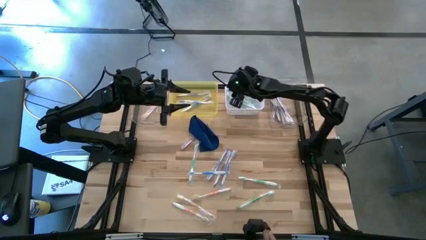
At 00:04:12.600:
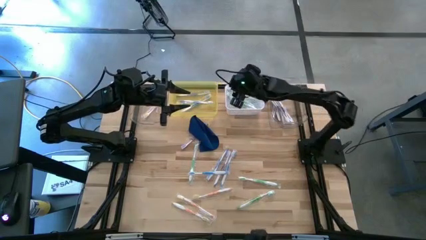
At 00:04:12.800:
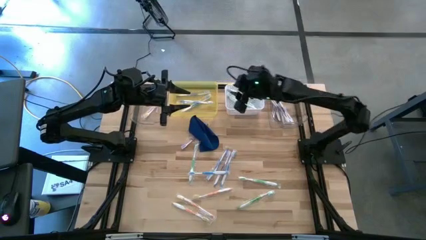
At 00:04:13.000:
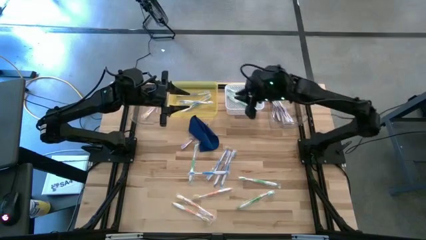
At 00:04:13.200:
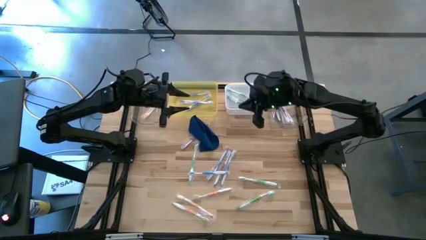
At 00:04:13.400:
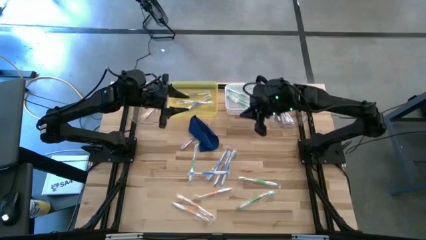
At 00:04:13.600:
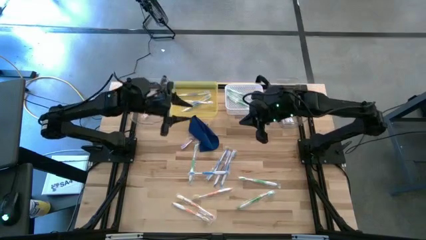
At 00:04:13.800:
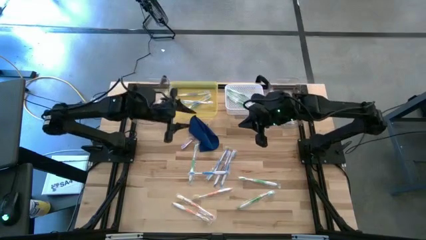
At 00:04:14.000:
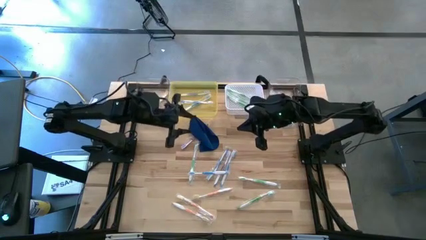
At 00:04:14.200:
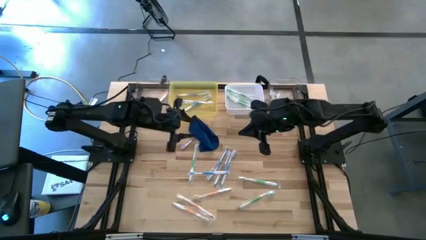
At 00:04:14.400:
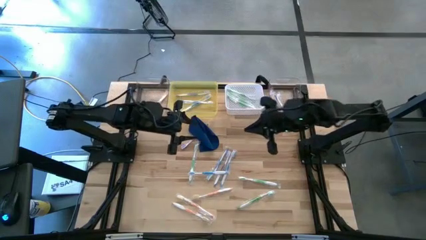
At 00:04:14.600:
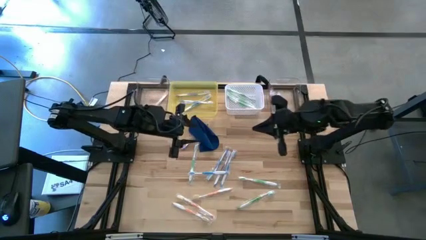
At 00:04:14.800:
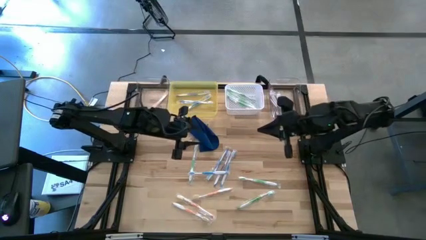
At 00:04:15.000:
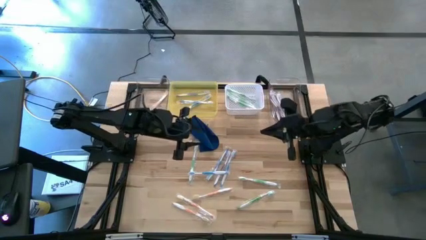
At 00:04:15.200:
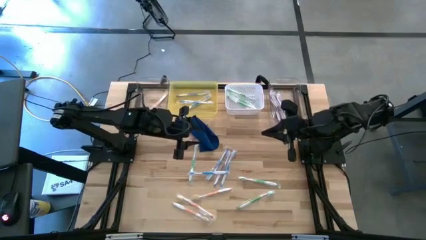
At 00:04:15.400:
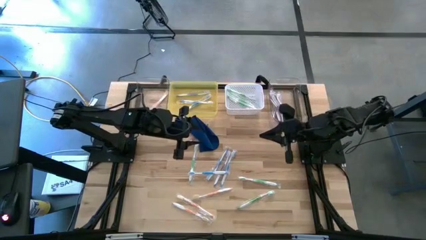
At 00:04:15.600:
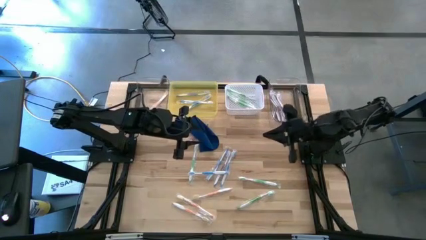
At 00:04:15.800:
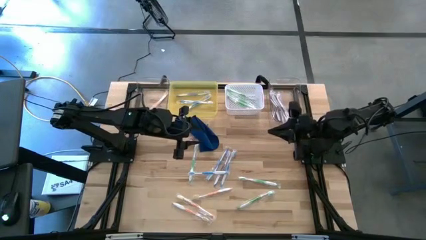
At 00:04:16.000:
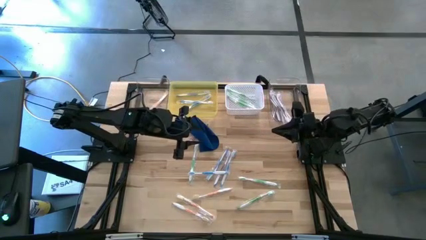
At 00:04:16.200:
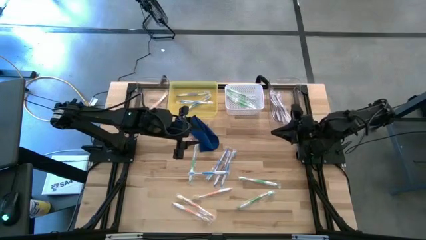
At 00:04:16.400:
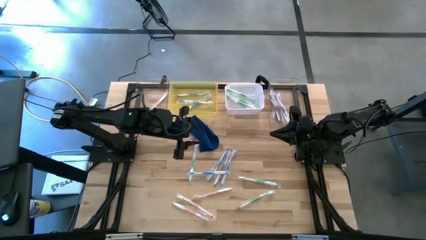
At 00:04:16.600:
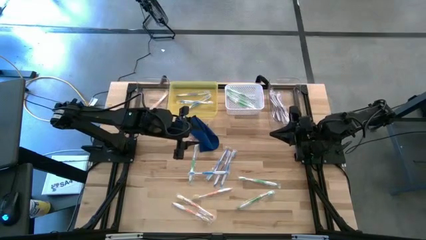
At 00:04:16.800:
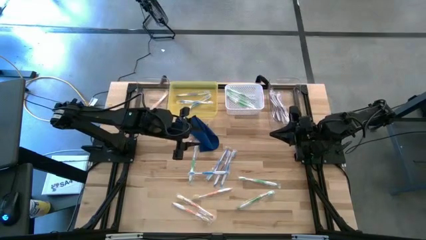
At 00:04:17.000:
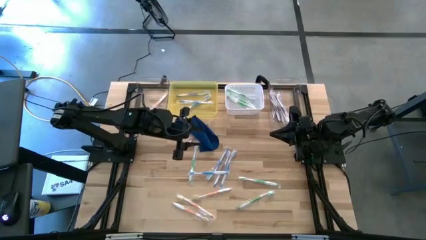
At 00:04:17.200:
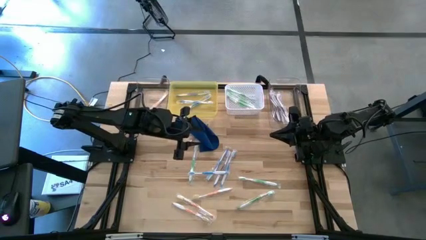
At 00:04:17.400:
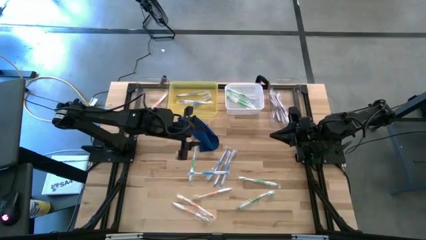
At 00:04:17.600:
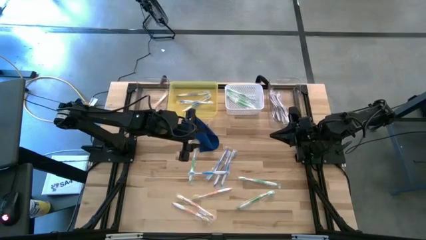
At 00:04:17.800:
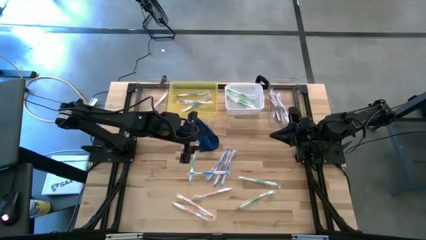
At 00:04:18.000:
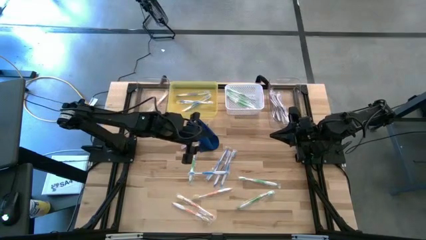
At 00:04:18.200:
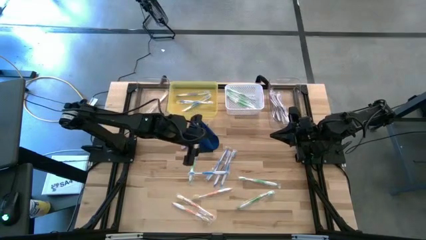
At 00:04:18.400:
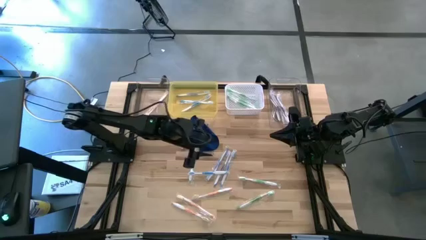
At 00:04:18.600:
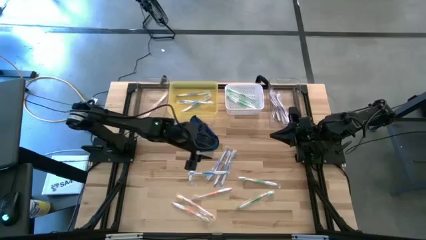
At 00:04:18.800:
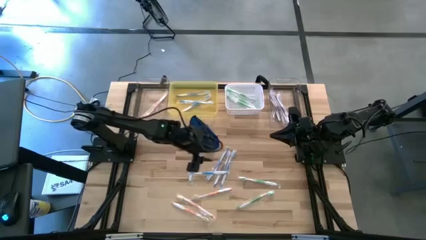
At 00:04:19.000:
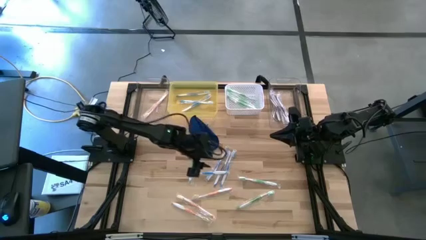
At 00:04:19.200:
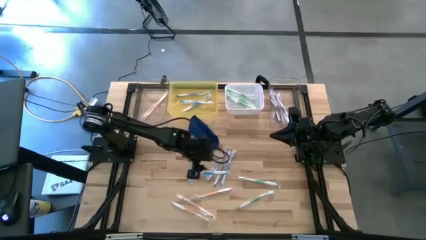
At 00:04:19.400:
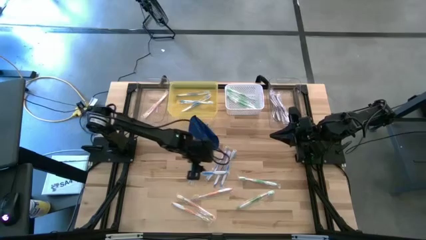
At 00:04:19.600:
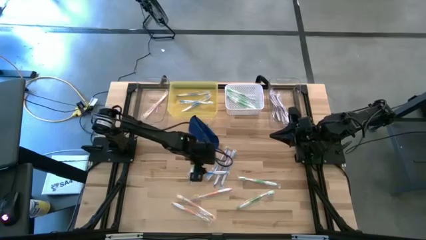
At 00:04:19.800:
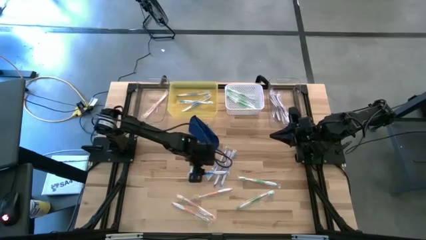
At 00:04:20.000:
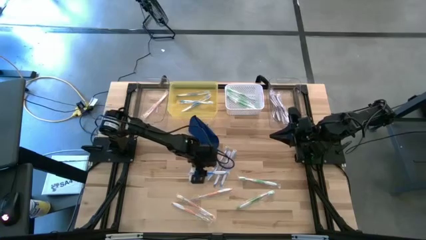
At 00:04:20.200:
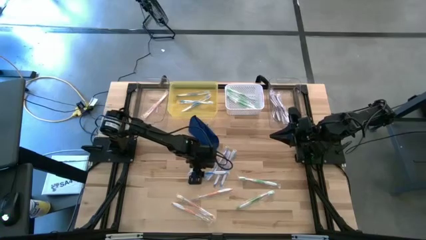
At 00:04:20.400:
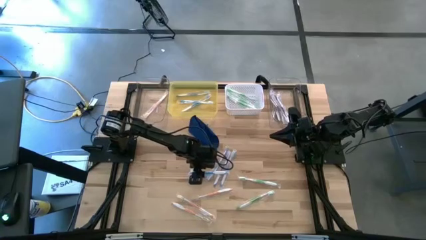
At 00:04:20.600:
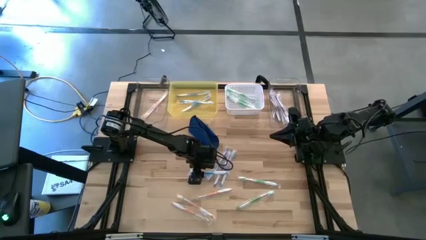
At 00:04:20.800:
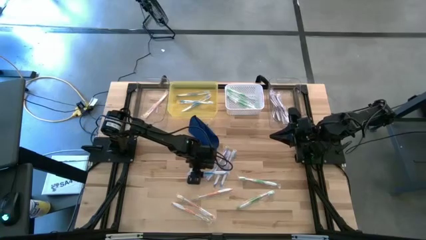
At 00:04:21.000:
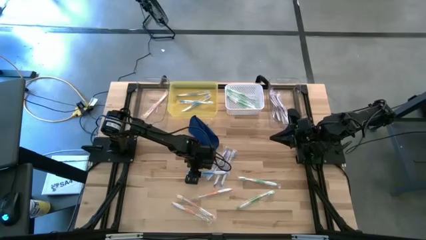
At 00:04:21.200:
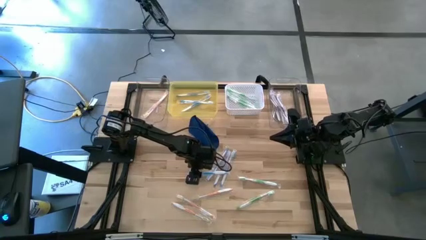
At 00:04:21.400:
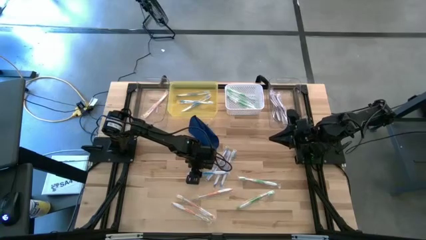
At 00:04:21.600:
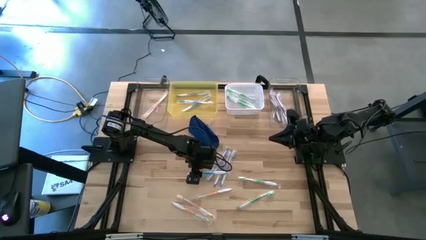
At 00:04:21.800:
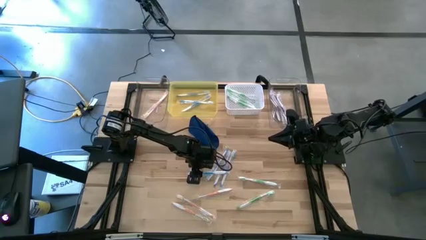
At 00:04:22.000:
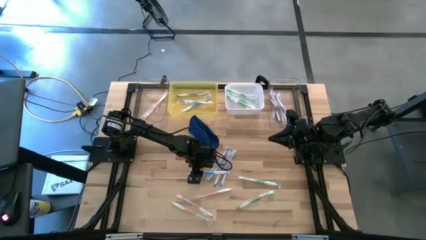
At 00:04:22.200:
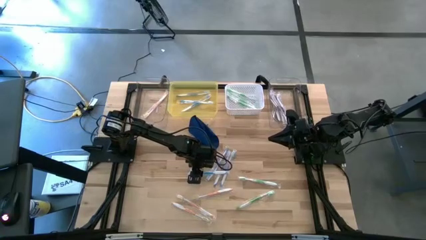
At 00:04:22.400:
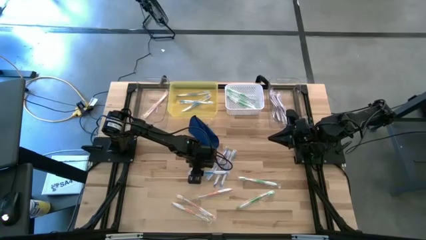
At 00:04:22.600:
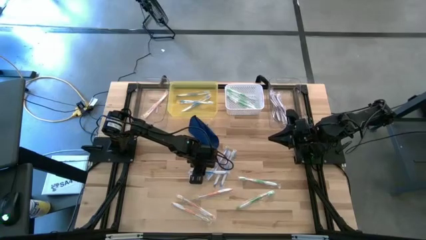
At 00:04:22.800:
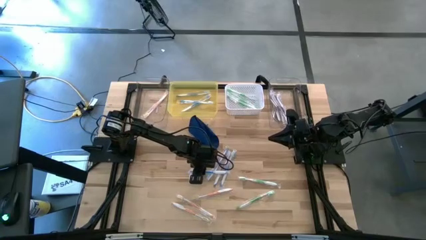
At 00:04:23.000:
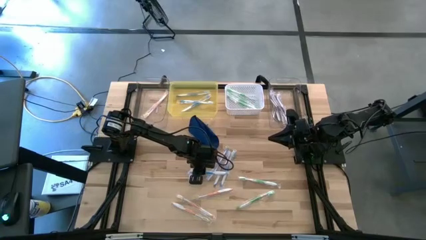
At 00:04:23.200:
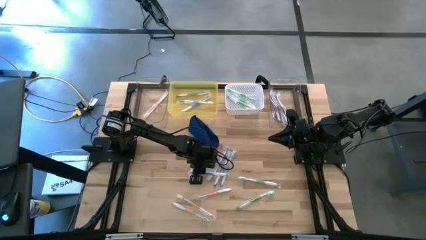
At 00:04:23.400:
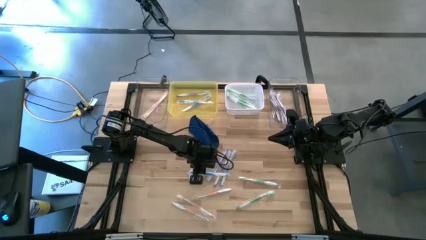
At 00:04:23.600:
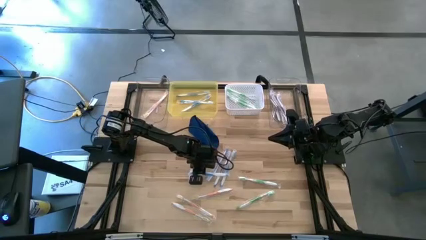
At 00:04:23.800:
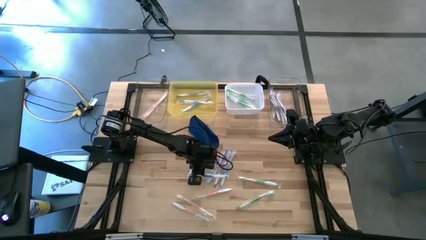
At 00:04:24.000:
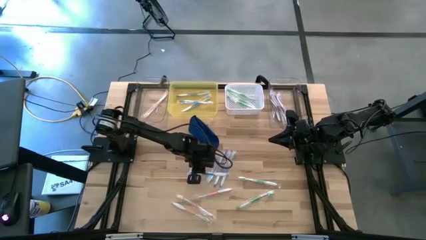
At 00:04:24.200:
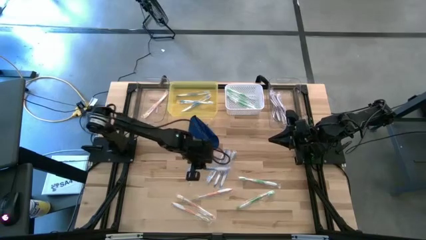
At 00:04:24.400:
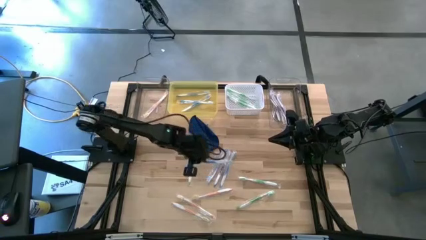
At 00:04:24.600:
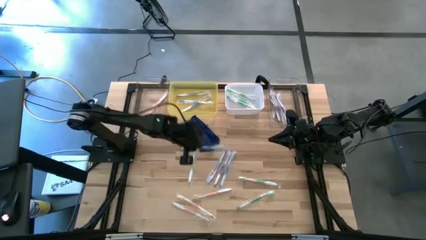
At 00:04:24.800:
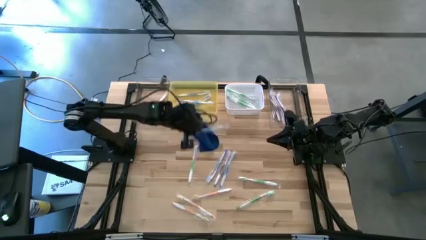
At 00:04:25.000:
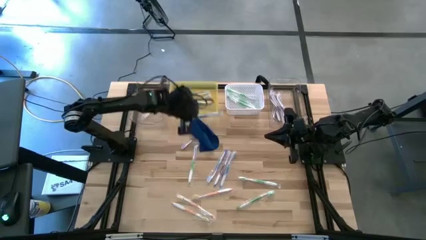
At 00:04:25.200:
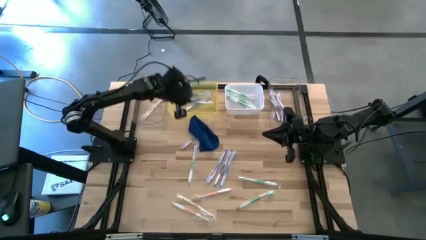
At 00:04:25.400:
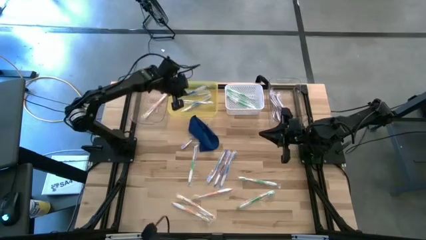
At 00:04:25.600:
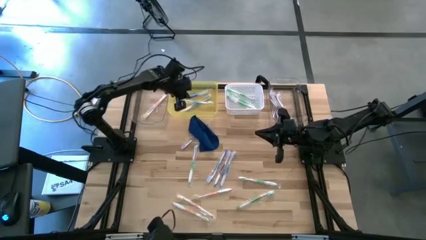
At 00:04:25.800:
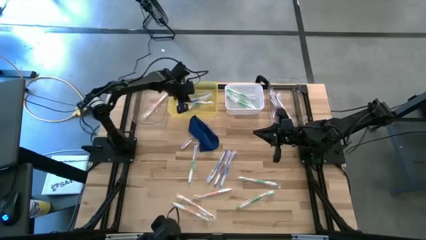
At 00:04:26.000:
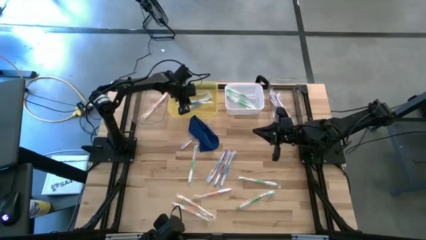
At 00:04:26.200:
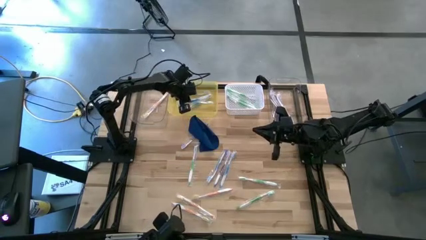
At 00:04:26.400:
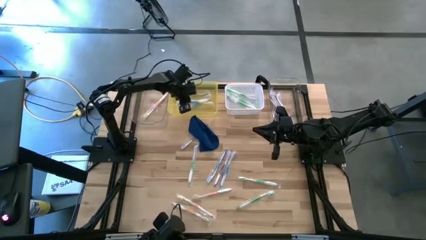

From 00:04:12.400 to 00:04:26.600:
Task: Pick & Place Toothbrushes
Put the blue toothbrush into the yellow bin

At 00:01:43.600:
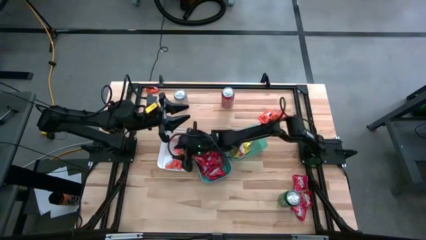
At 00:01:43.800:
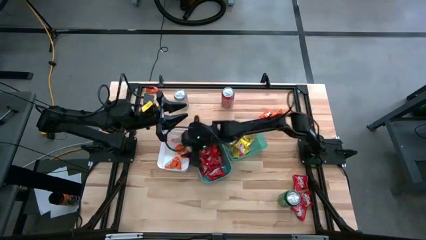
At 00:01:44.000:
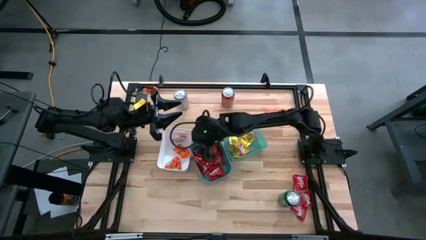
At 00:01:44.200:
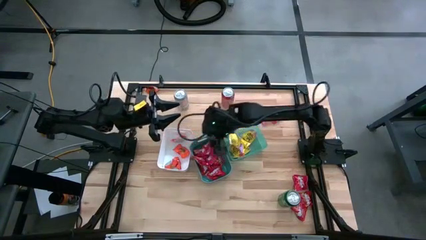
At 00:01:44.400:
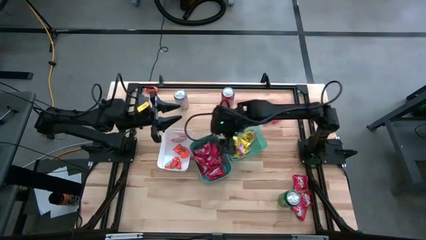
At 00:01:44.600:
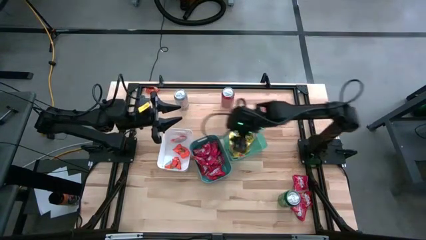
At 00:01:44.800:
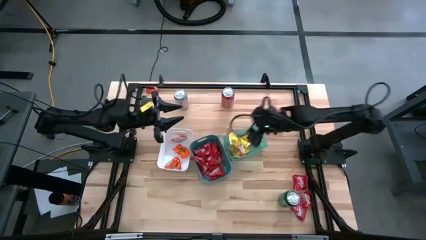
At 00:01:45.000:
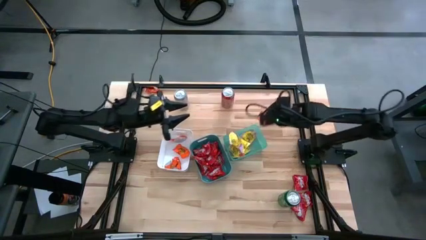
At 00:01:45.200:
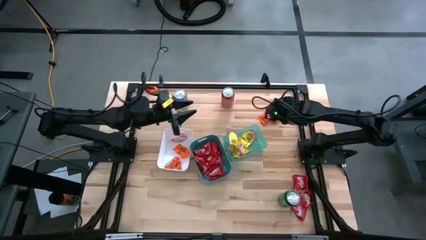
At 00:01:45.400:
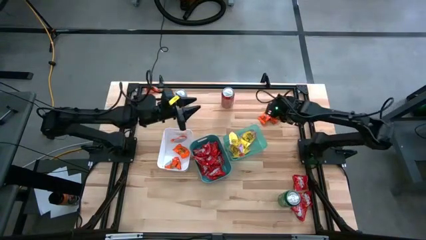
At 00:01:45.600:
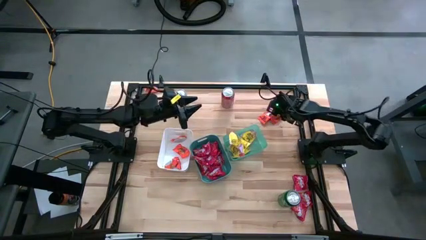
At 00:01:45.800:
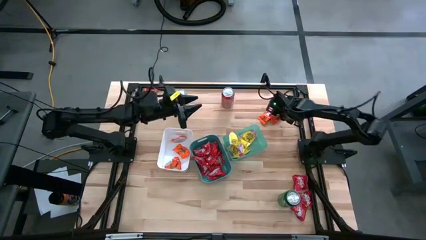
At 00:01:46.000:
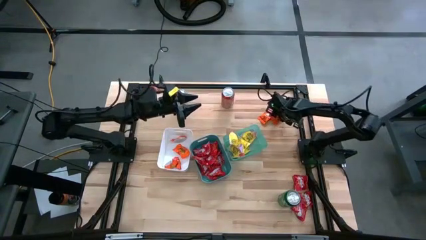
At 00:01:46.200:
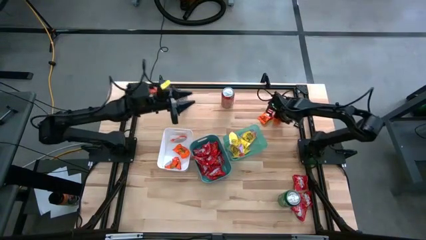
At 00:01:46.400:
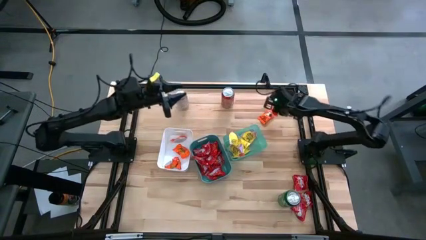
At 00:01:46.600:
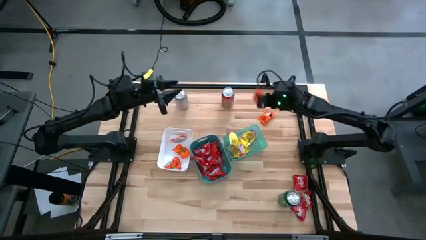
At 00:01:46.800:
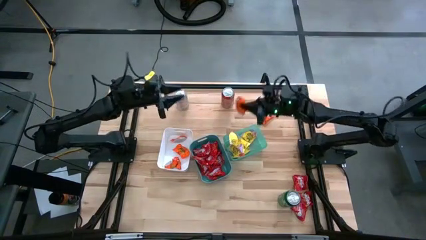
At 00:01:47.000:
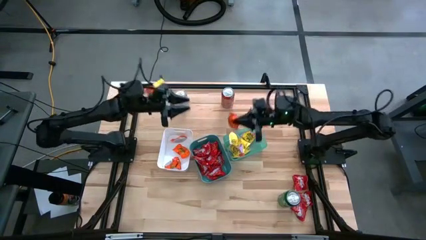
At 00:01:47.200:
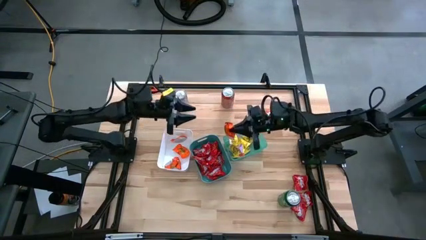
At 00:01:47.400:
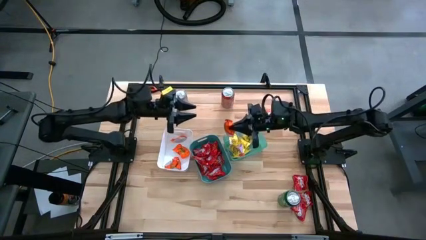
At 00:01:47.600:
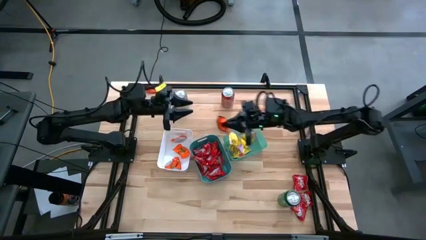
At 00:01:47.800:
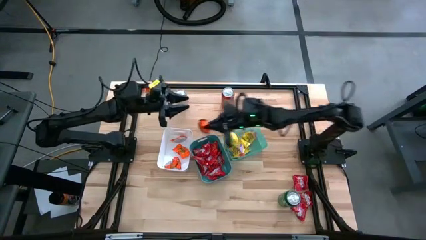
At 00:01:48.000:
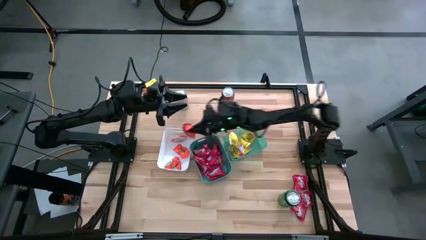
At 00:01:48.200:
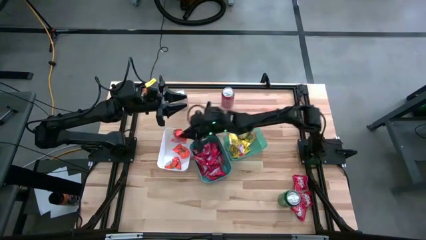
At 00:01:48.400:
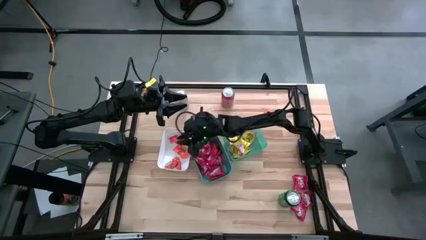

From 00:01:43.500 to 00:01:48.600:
Task: Sort candy
Put the orange chocolate into the white bin
